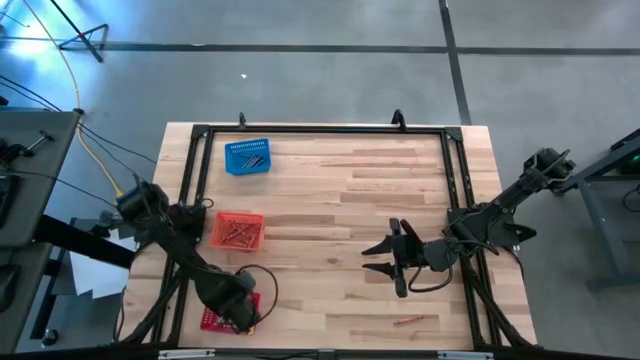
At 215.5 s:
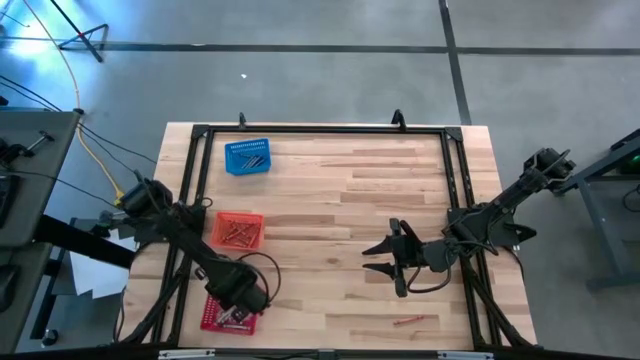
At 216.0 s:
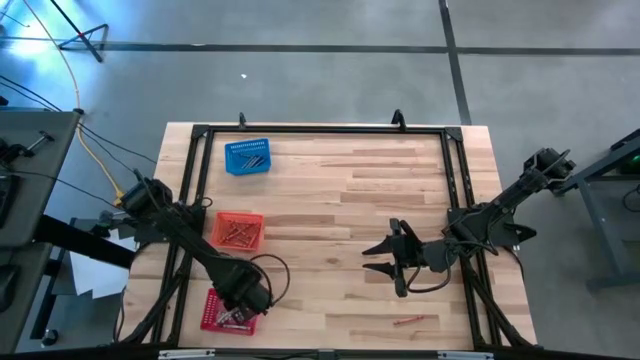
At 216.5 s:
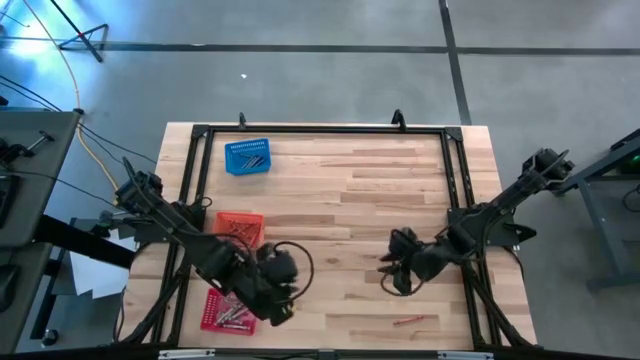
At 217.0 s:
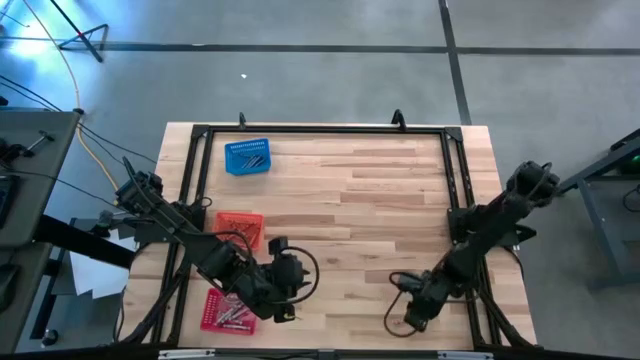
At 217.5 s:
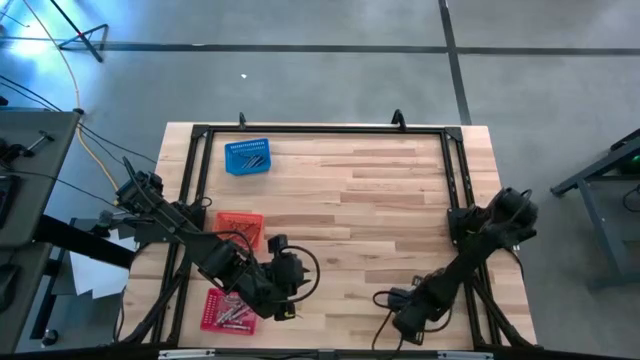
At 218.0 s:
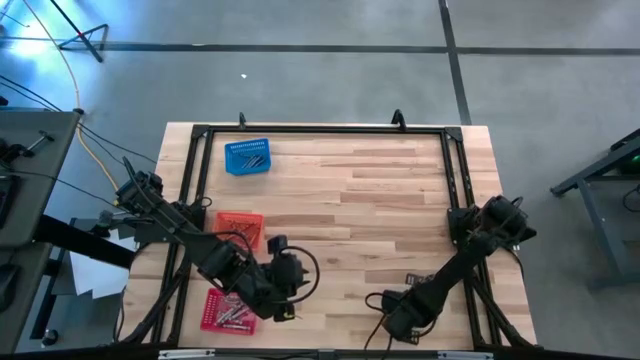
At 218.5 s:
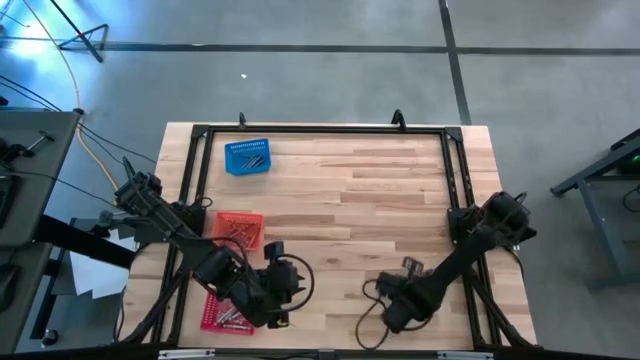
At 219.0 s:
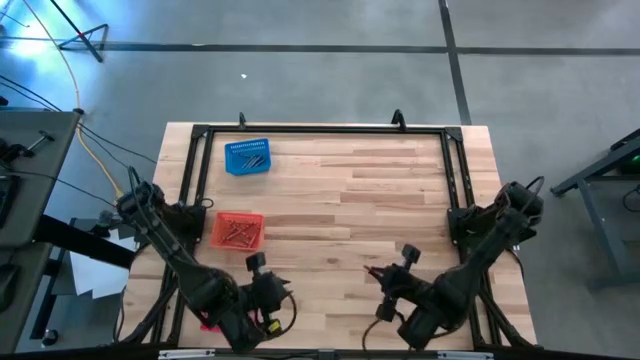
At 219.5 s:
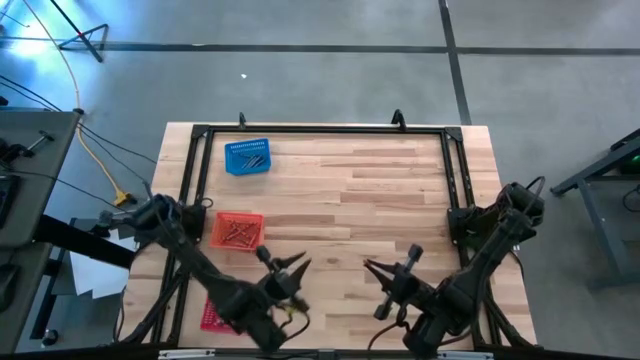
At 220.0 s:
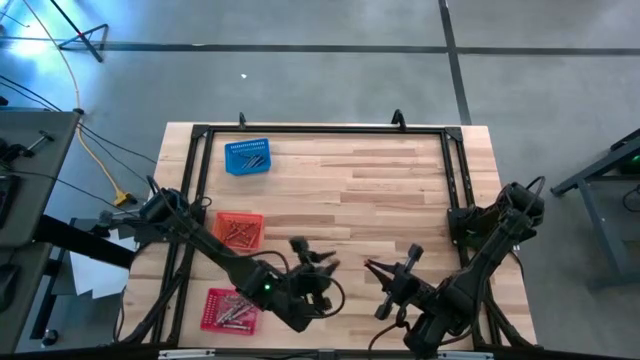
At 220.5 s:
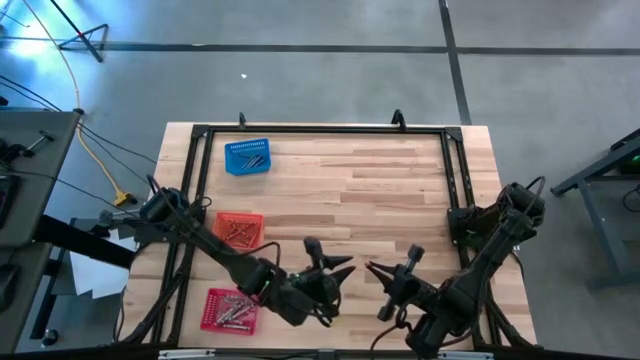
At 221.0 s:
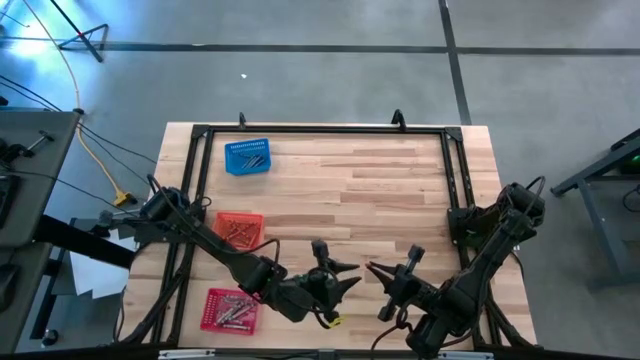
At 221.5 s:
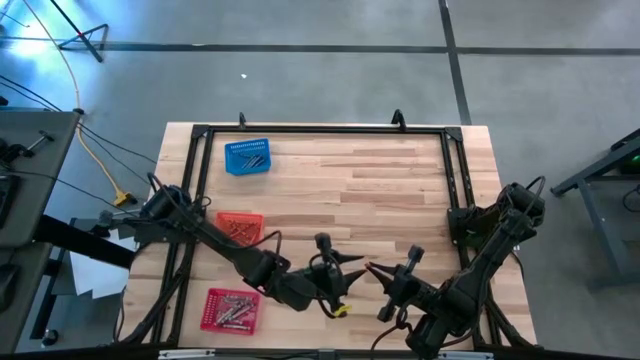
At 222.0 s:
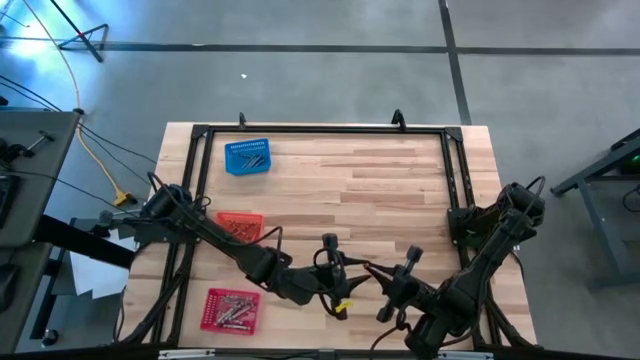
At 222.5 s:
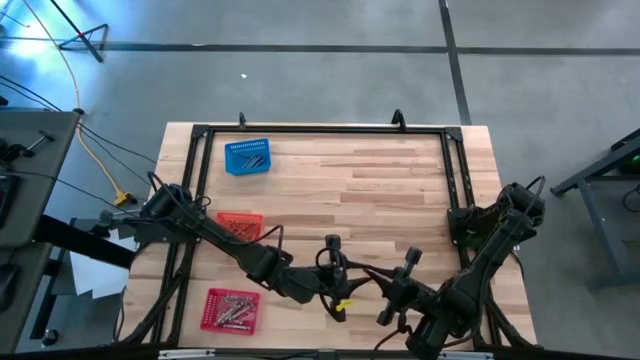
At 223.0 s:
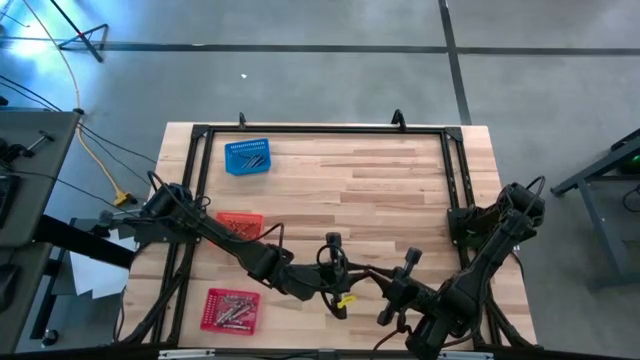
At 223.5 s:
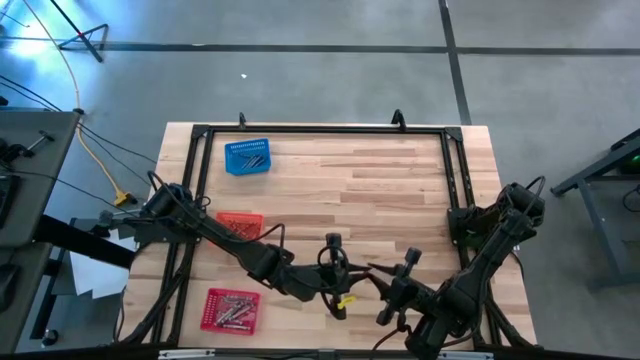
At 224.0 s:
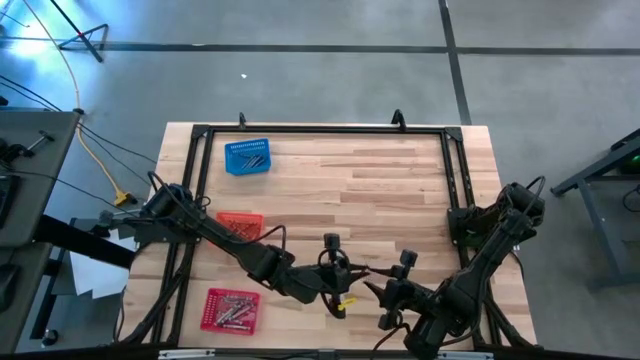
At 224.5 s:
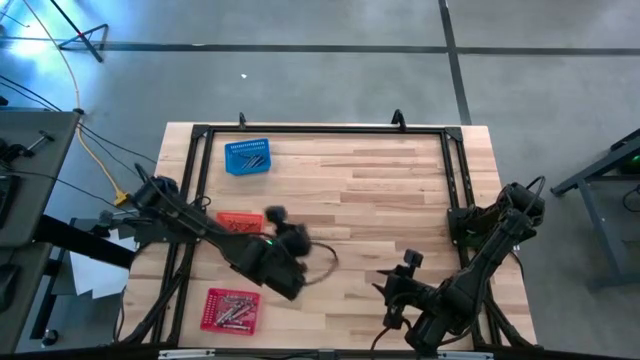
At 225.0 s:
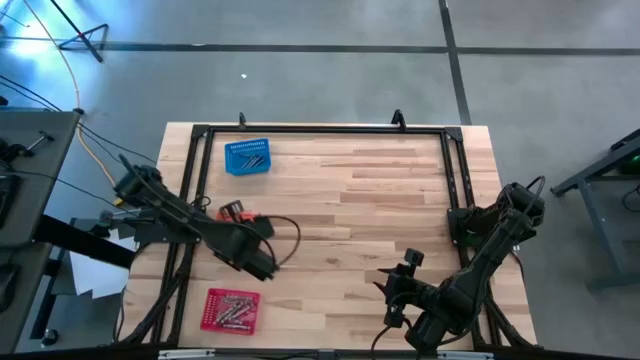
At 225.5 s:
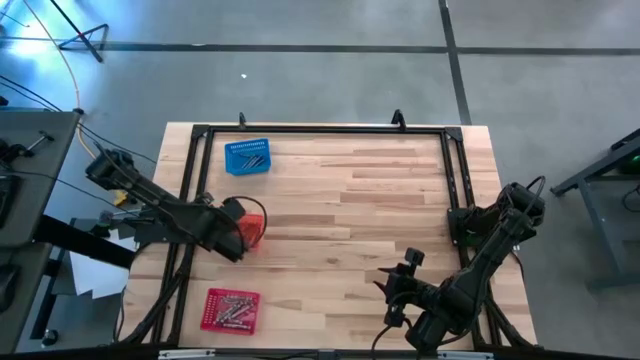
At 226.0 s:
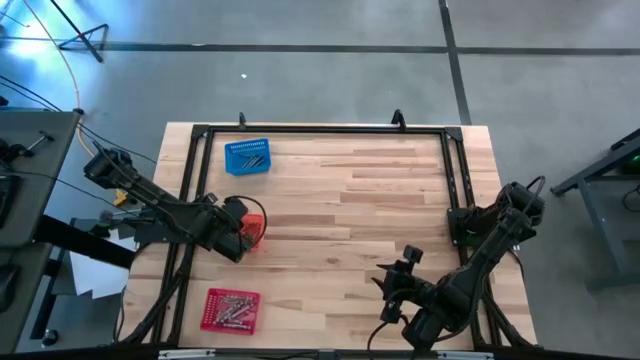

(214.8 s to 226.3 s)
Task: Sort crayons
Put the orange crayon into the orange bin

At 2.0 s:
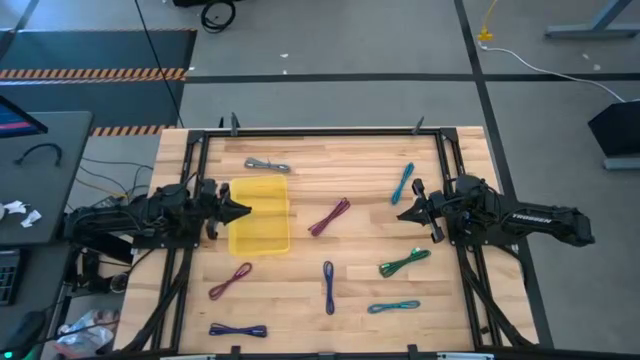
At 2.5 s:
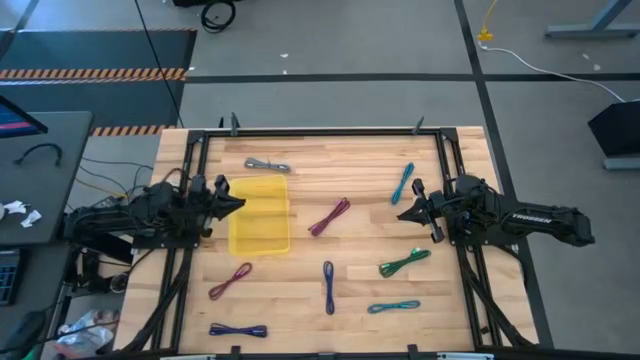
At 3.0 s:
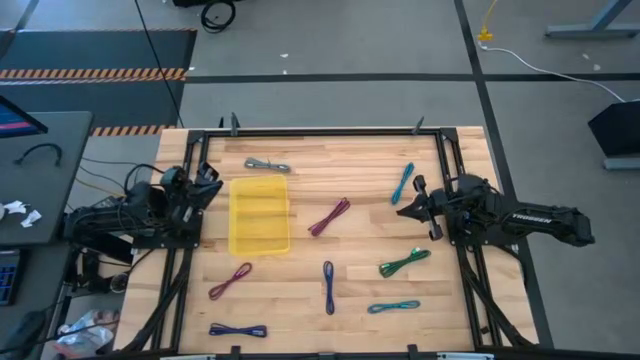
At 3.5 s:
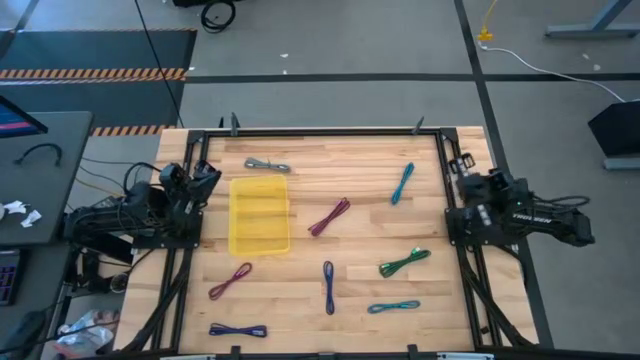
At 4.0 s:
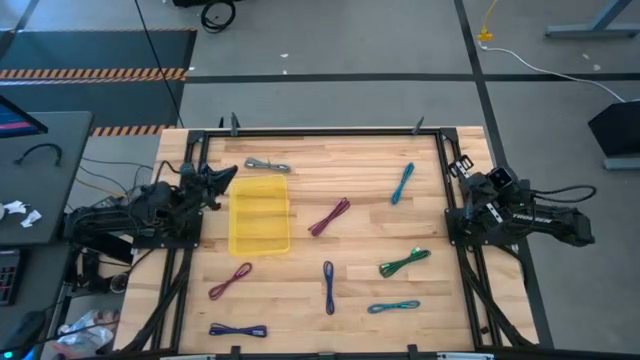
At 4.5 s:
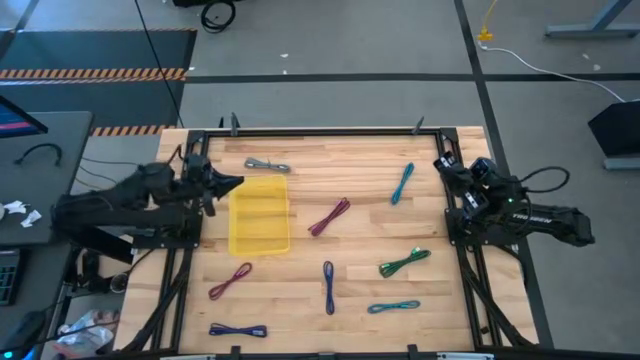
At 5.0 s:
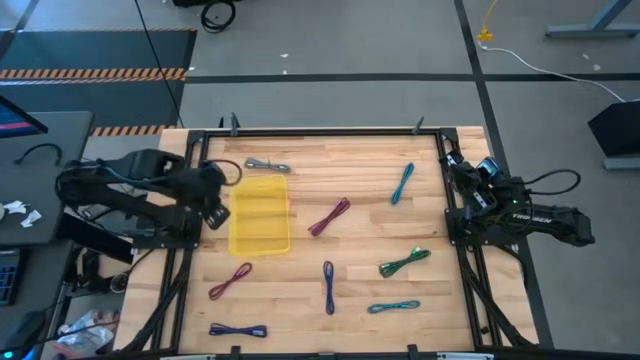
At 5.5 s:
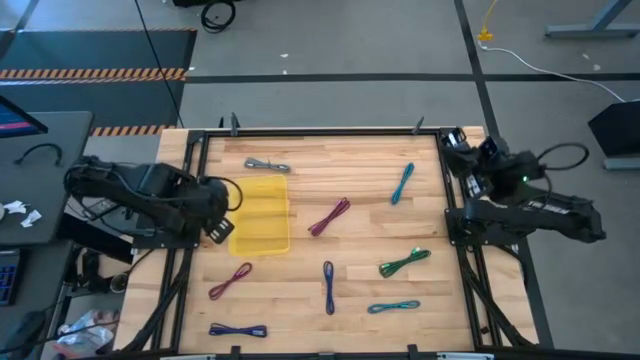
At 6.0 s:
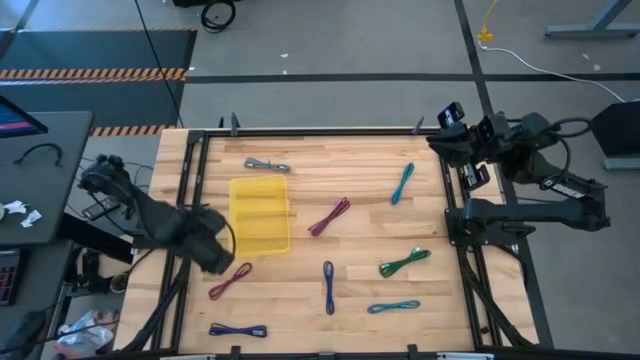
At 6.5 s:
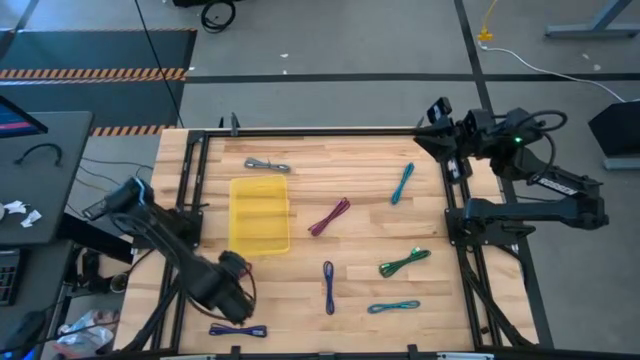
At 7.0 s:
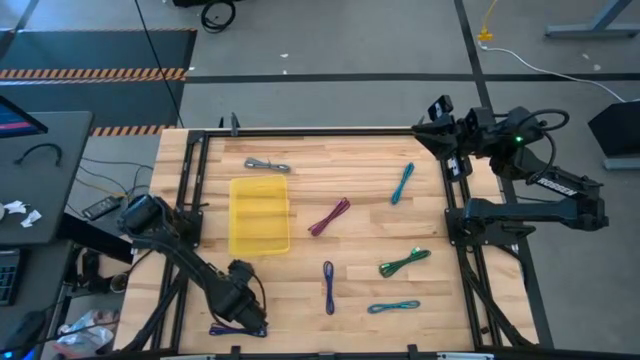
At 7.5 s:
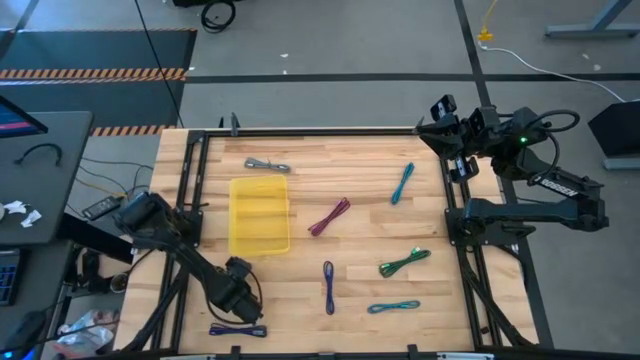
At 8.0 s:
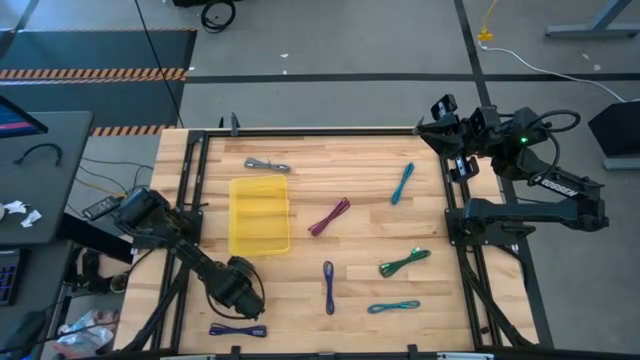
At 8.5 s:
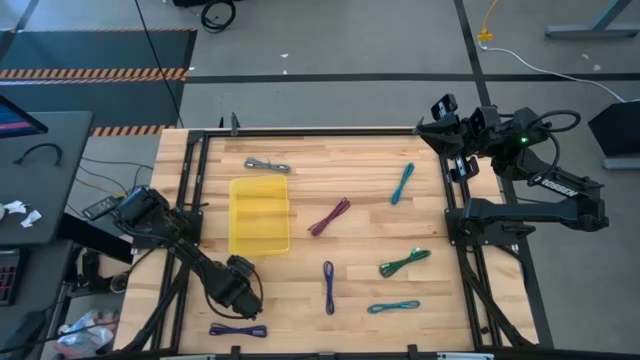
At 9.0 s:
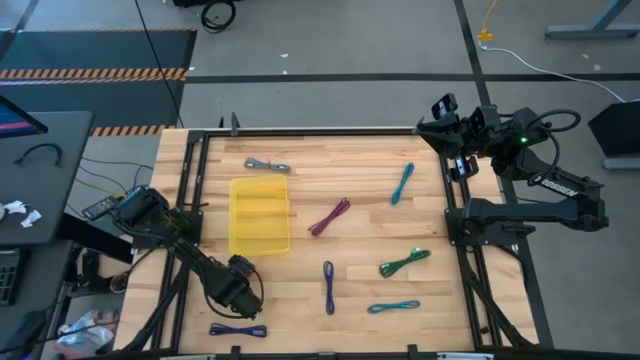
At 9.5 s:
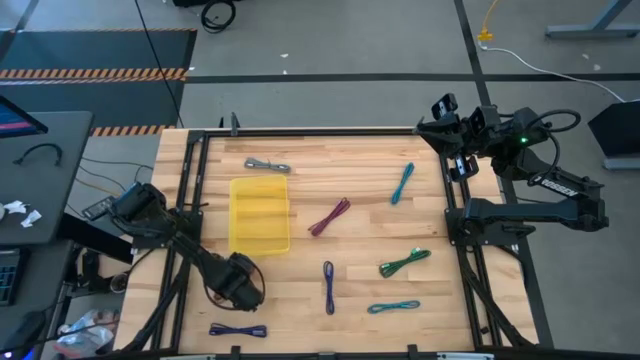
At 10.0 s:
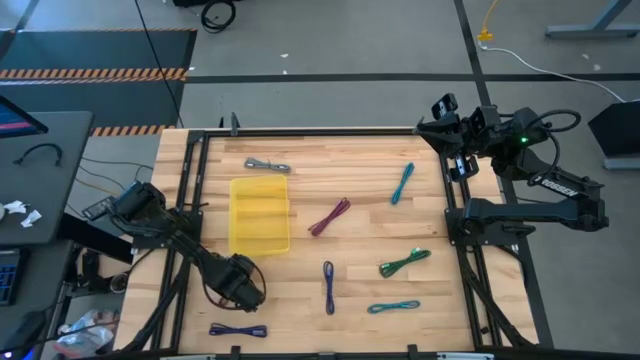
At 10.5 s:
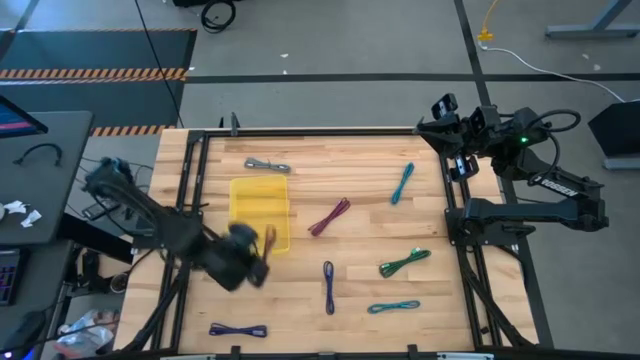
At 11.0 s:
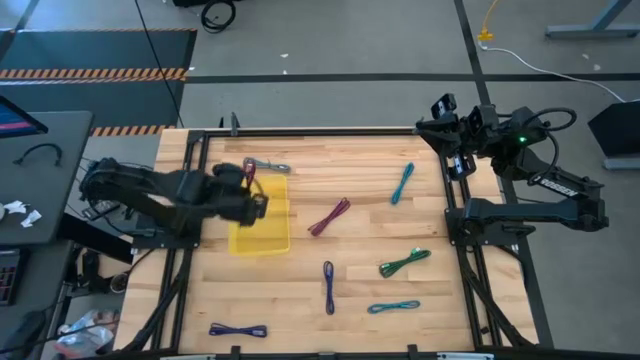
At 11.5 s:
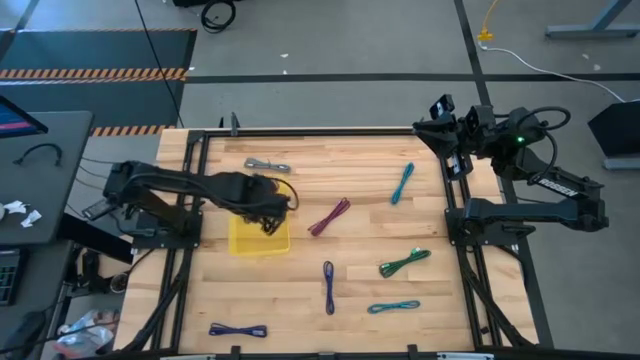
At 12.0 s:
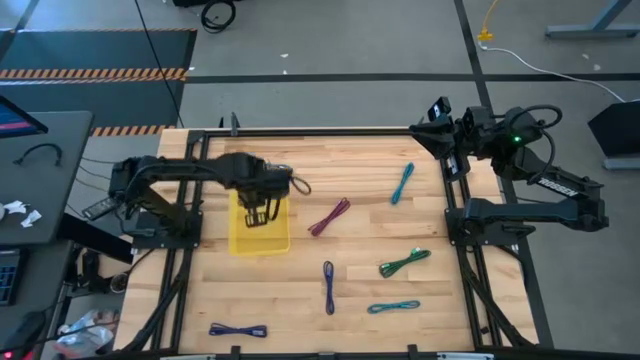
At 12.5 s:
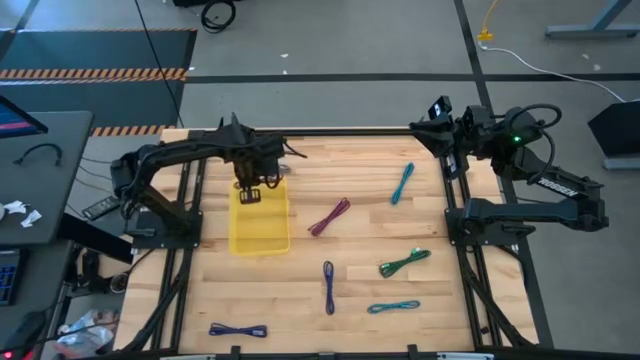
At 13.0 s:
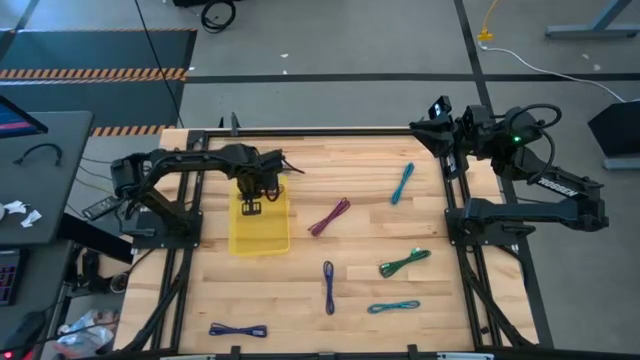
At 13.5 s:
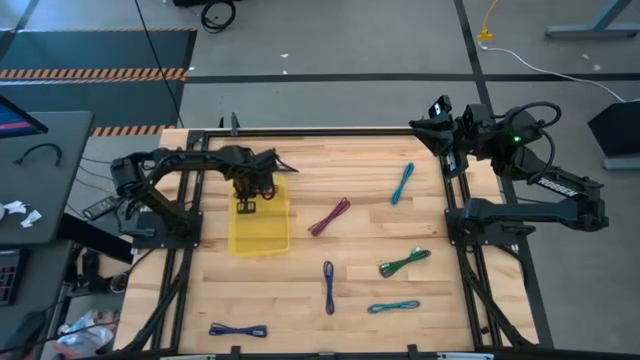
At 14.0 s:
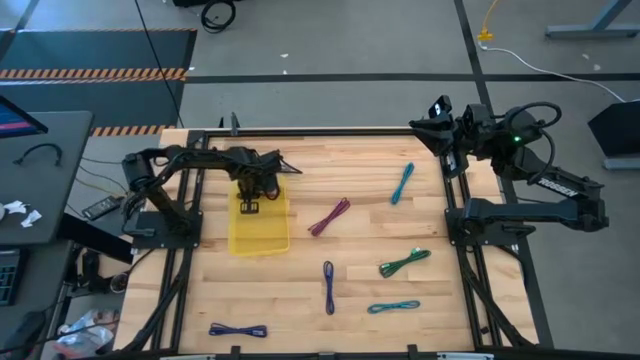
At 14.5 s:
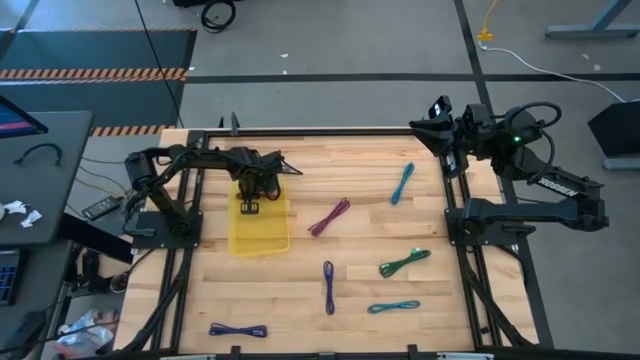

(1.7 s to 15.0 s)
Task: Pick and place USB-C Cables
Put the bottom pink charger cable into the yellow bin
